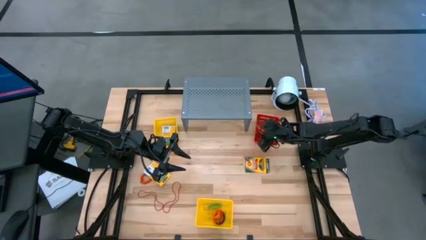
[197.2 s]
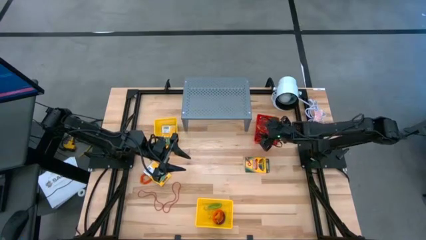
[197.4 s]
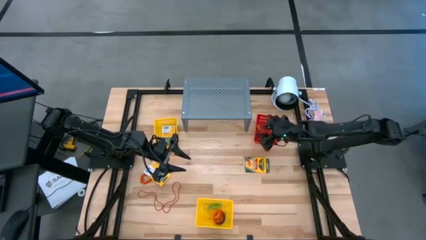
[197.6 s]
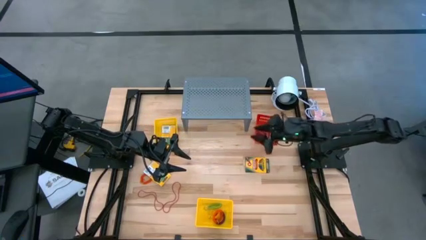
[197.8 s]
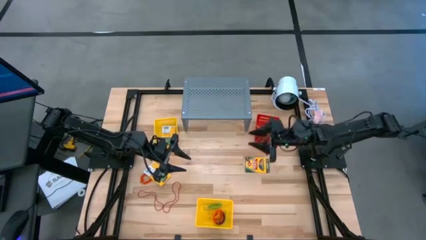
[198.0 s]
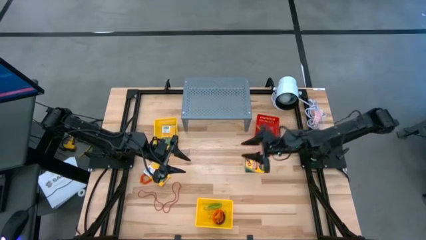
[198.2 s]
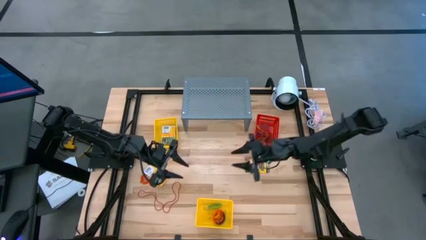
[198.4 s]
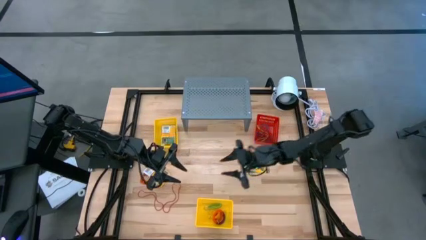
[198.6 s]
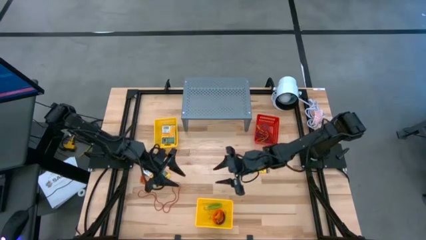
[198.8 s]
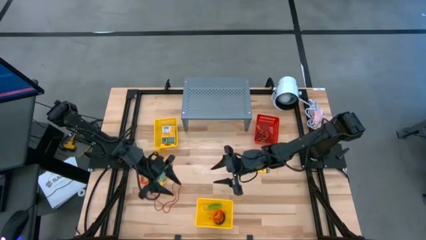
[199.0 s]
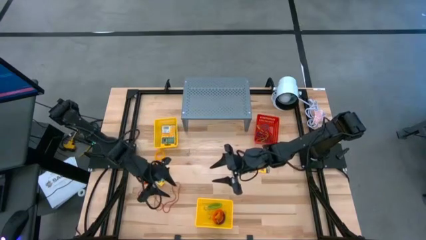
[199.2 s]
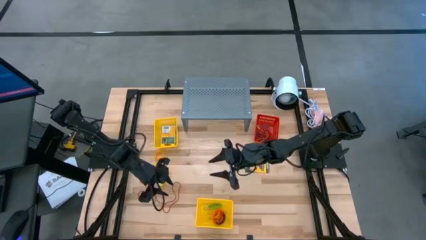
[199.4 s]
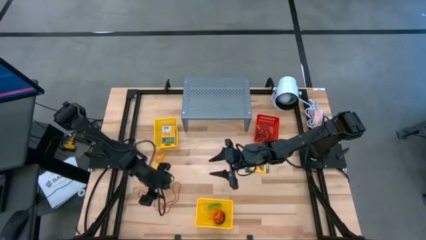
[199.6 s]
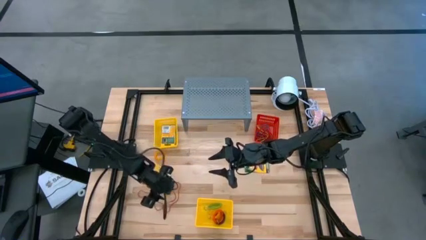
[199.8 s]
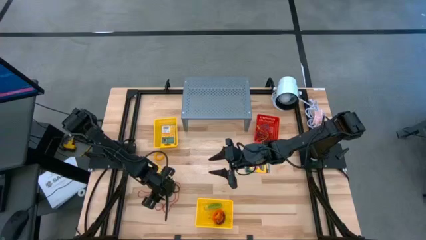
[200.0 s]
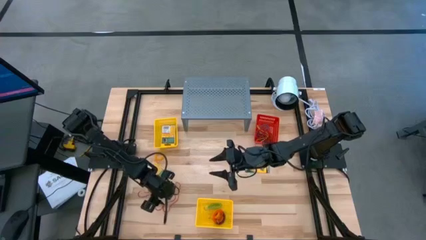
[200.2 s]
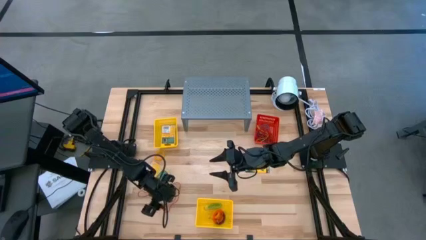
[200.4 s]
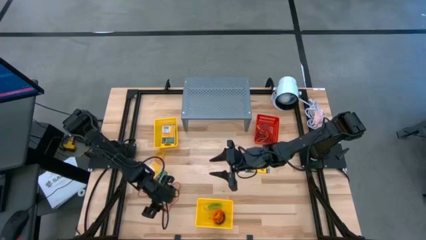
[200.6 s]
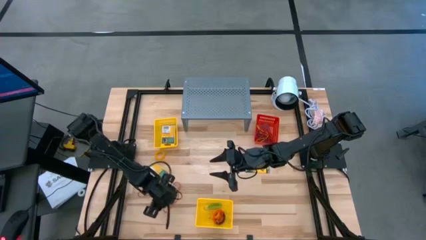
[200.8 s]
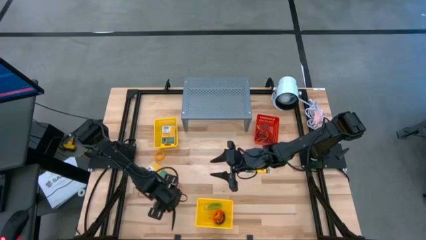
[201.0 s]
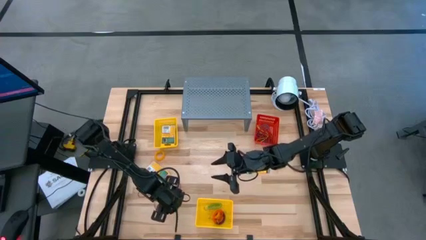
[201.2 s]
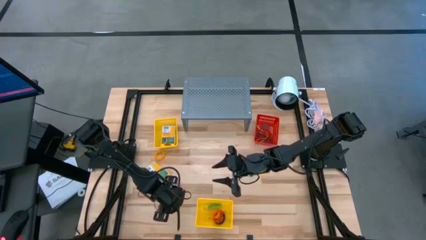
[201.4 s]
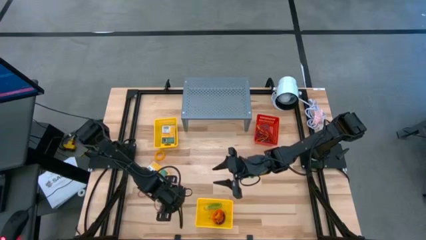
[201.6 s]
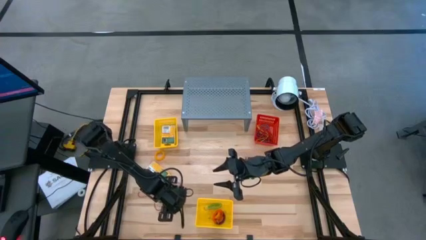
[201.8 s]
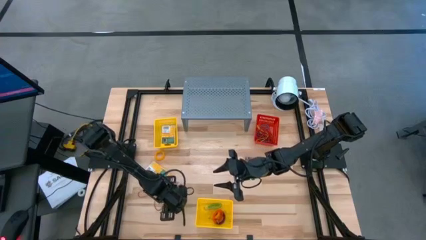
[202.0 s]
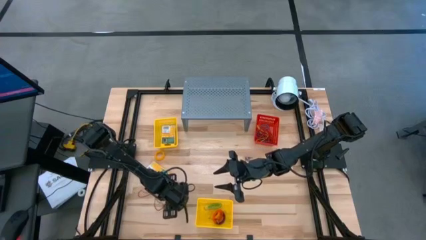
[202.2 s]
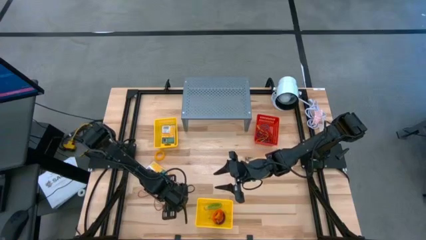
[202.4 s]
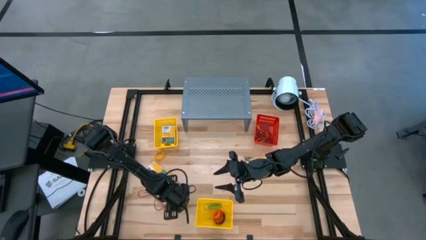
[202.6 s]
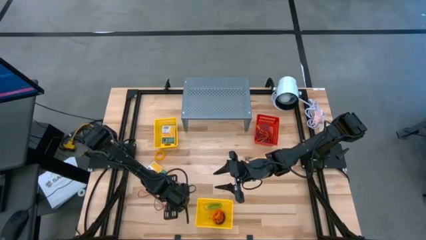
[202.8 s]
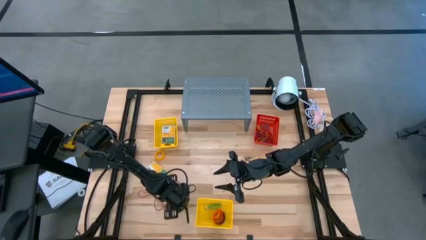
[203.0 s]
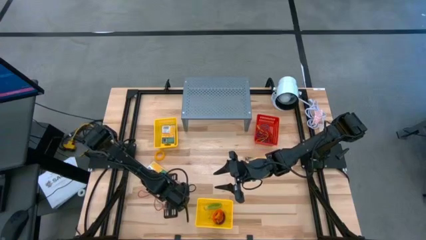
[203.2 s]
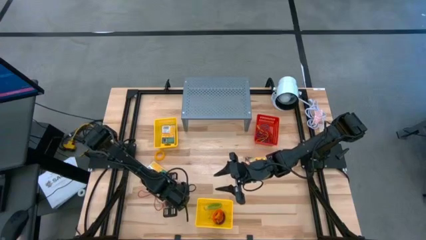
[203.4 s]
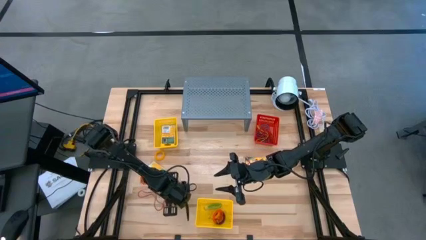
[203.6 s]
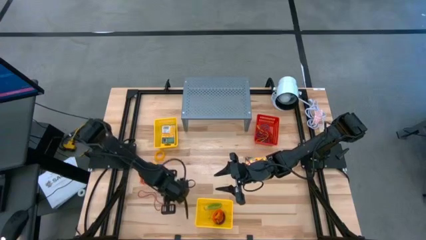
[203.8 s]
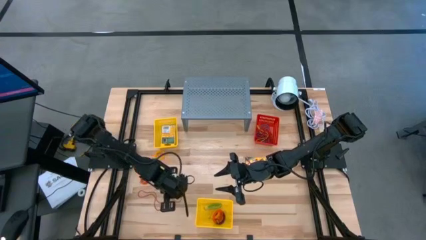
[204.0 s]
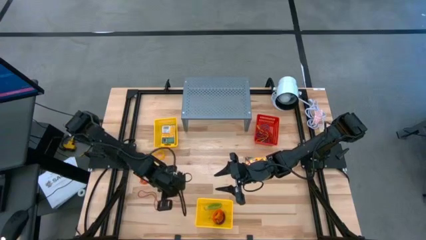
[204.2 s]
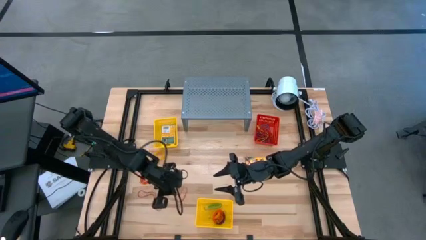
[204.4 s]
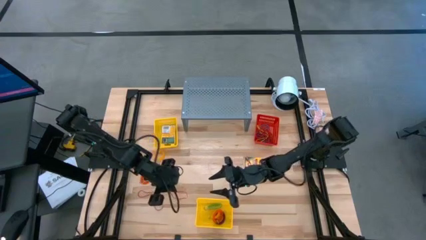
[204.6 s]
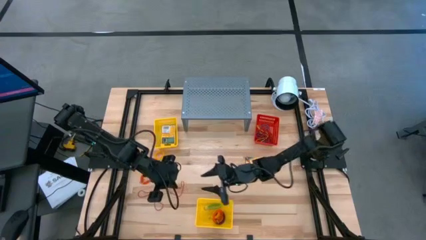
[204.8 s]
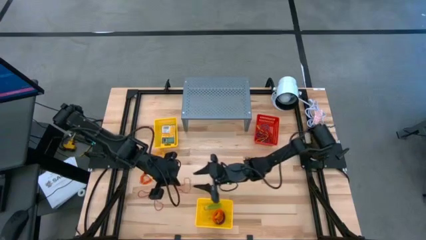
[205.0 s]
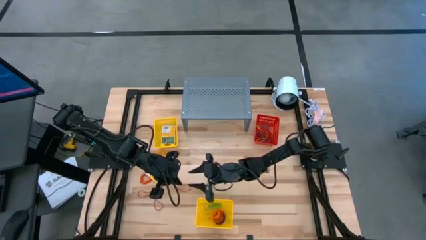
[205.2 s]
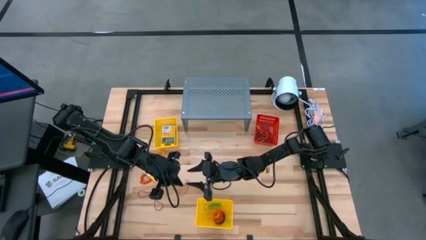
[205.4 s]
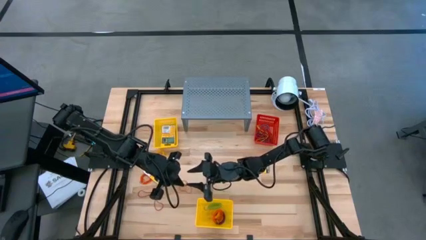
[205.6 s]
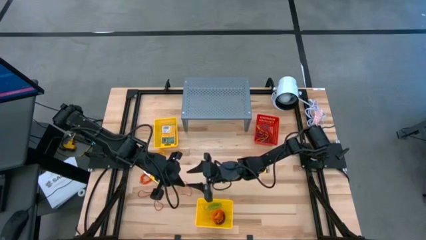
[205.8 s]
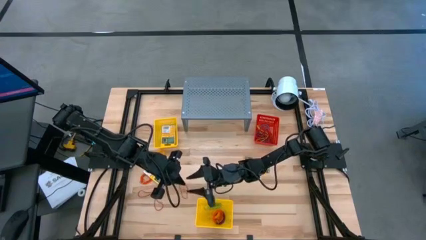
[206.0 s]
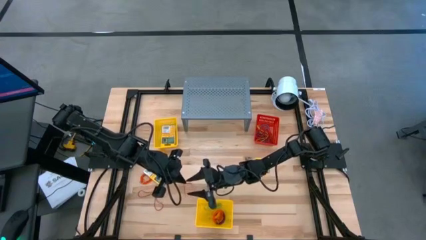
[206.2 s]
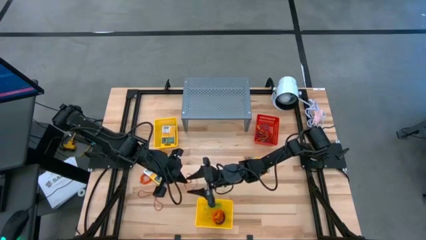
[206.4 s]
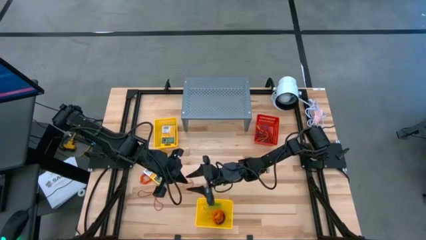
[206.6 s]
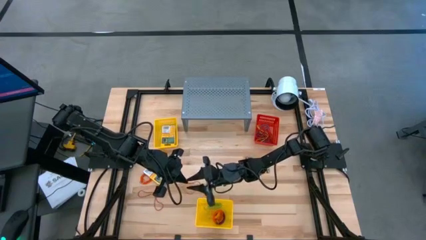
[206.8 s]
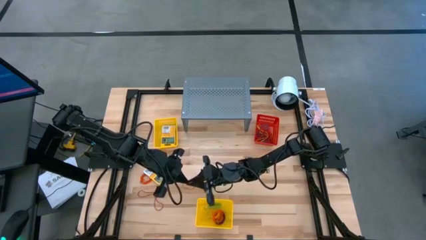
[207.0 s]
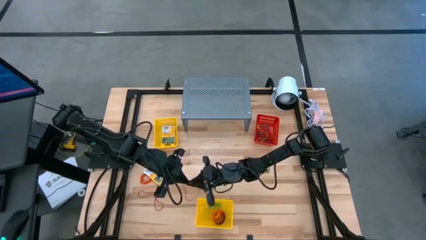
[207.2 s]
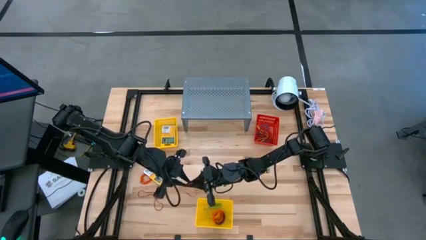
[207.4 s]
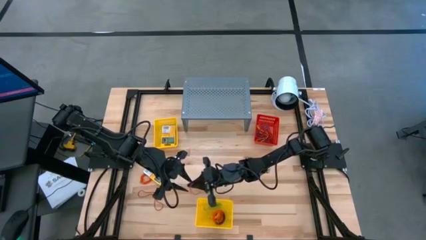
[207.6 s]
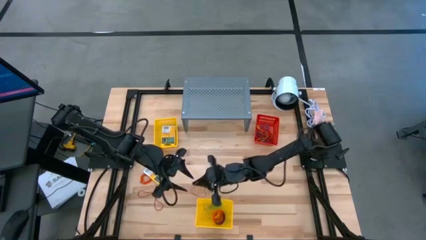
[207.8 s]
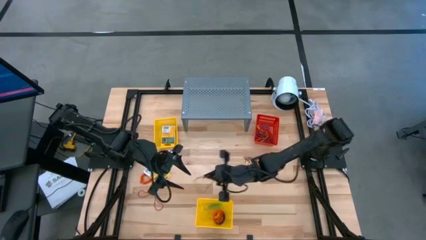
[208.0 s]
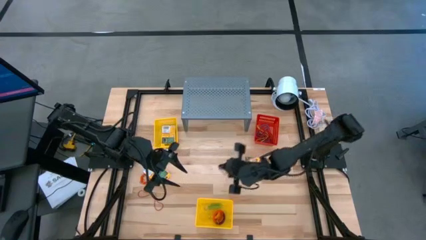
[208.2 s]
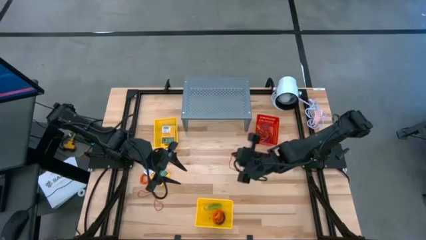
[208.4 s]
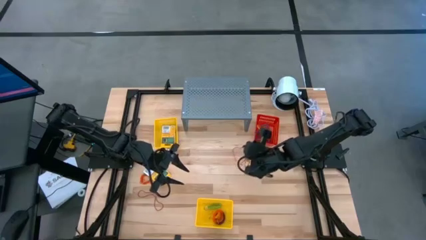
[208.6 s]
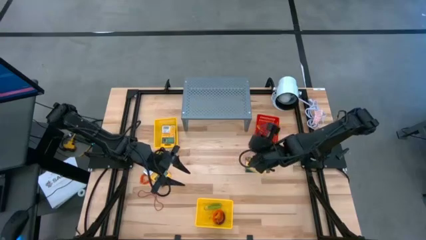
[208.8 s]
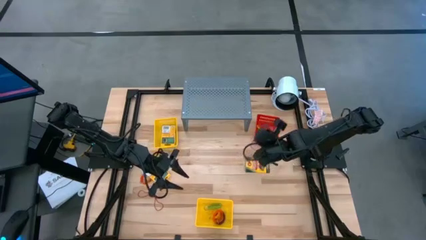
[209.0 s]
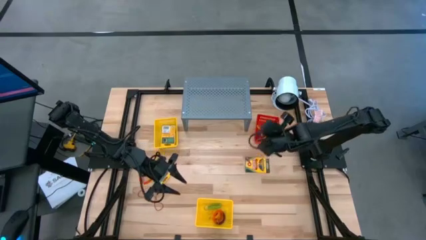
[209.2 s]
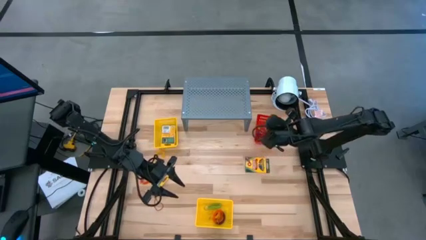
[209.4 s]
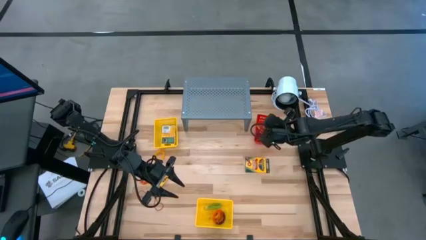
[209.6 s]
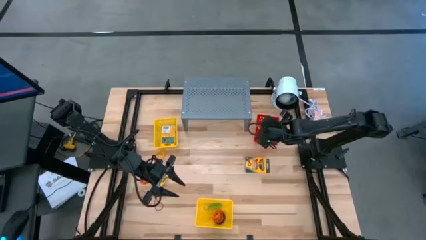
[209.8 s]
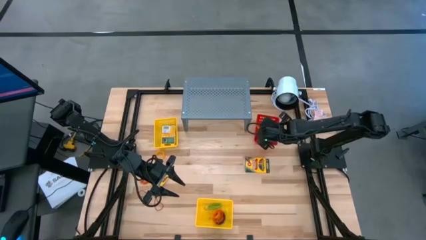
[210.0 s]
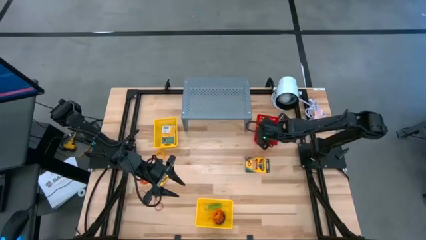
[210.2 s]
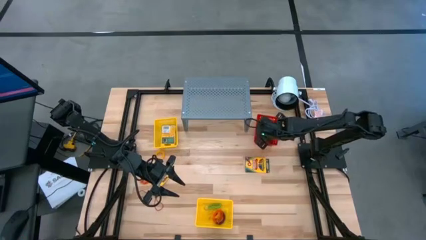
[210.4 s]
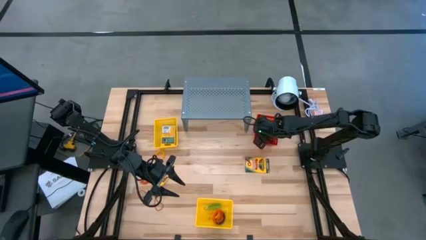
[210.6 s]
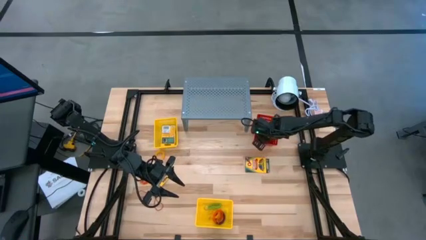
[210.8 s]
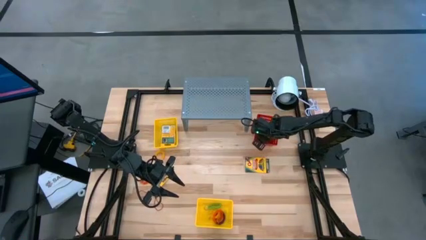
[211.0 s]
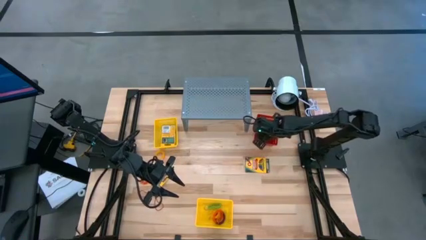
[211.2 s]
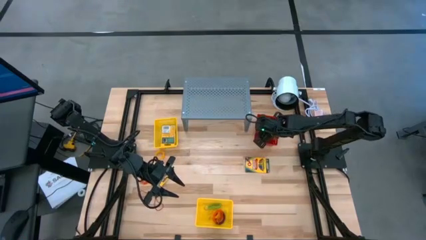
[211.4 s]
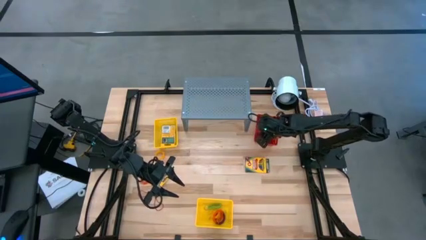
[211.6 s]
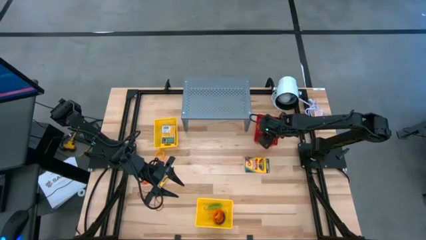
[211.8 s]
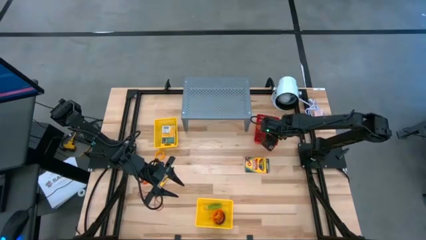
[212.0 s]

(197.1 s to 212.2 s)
Task: Pick & Place Office Desk Supplies
Put the red rubber band into the red bin
